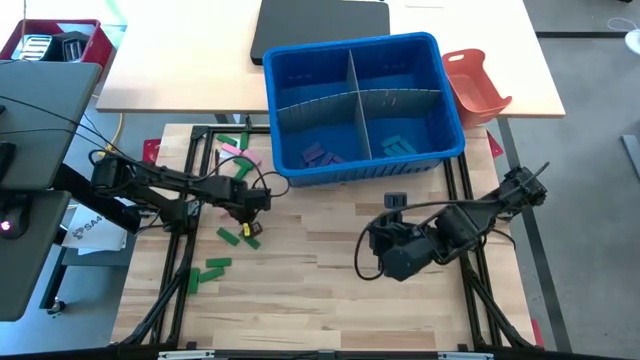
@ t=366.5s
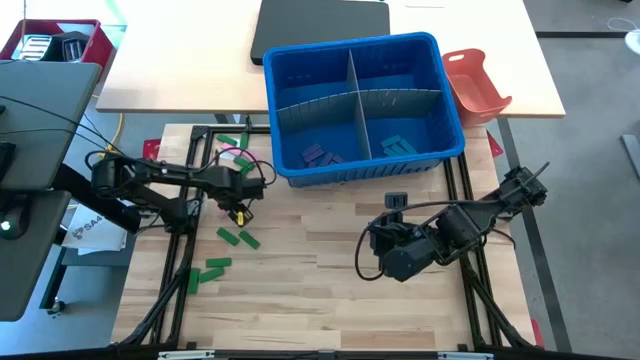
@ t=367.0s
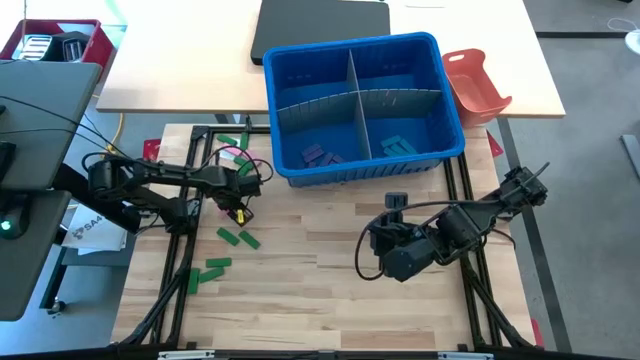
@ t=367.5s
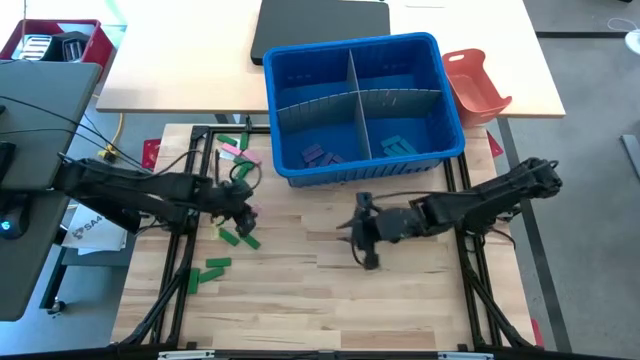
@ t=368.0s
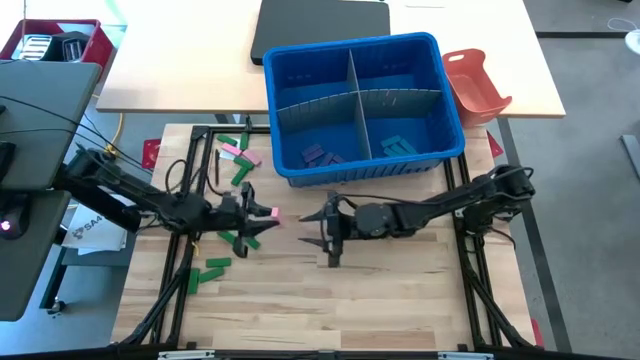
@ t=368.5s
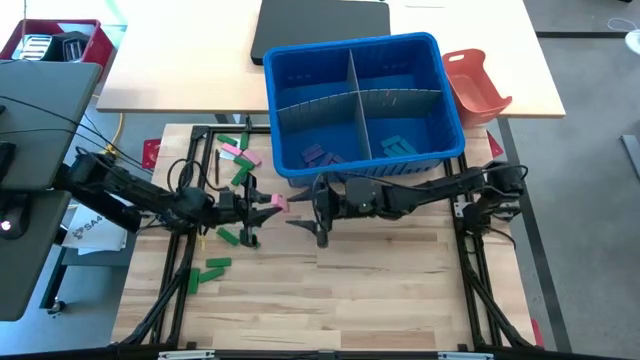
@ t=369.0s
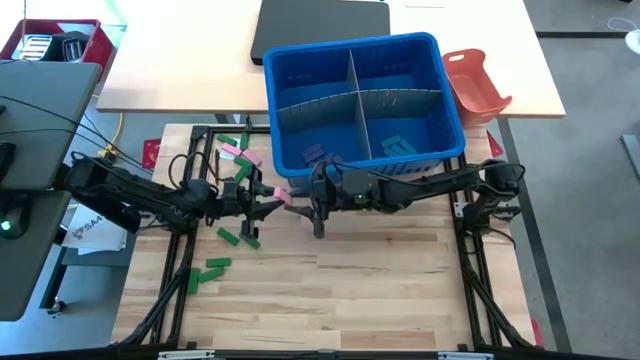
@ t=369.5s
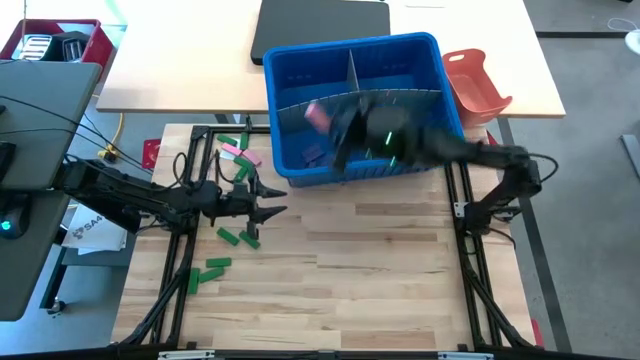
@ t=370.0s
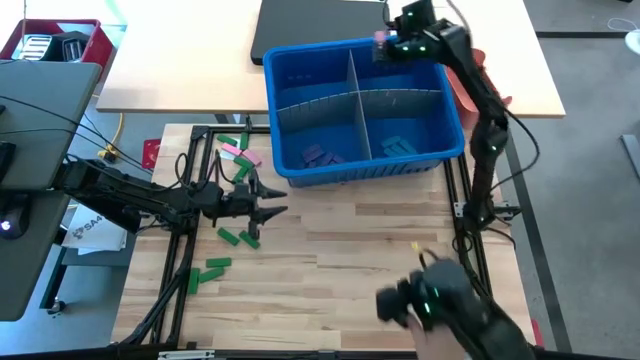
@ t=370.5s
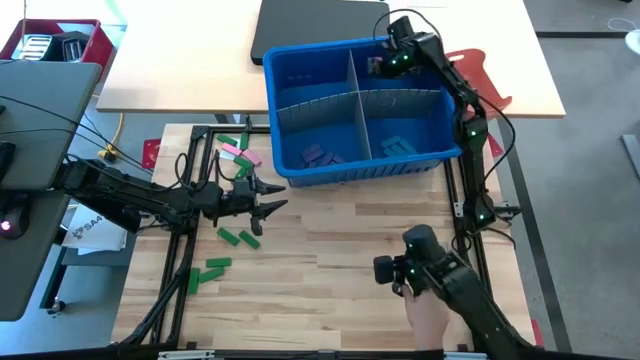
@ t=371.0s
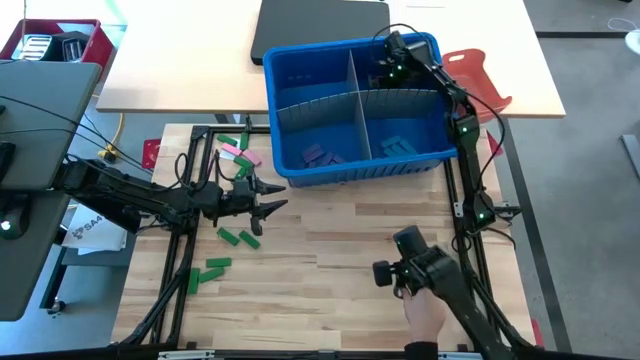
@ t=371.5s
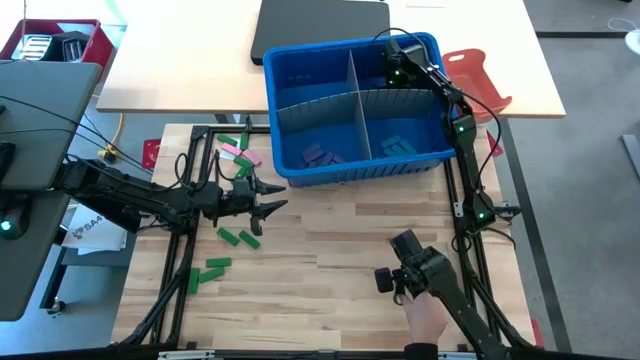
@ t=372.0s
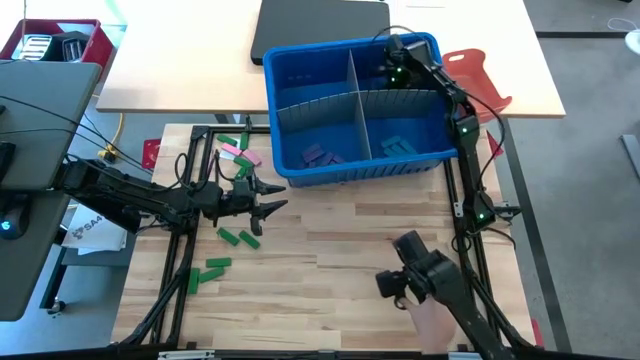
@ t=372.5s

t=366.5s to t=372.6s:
Task: Sort blocks
Put the pink block into the blue bin with the other pink block

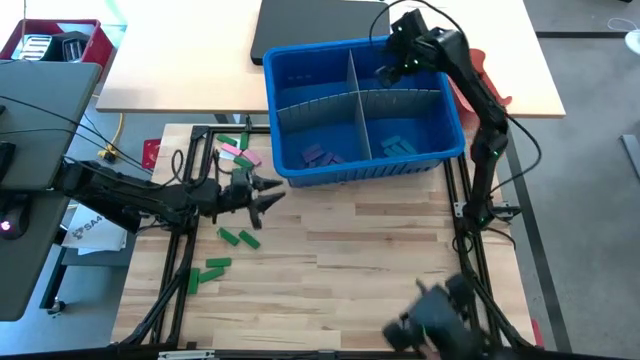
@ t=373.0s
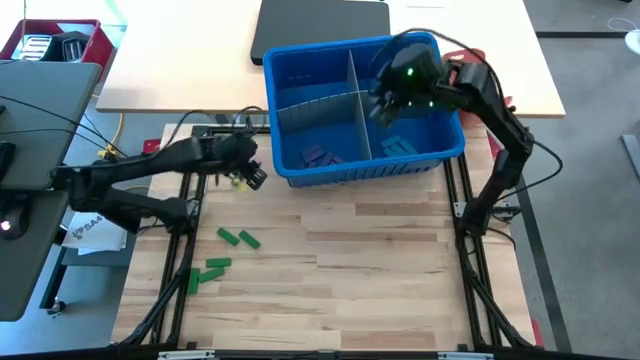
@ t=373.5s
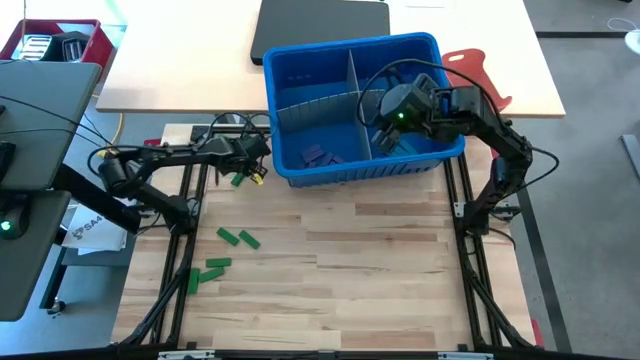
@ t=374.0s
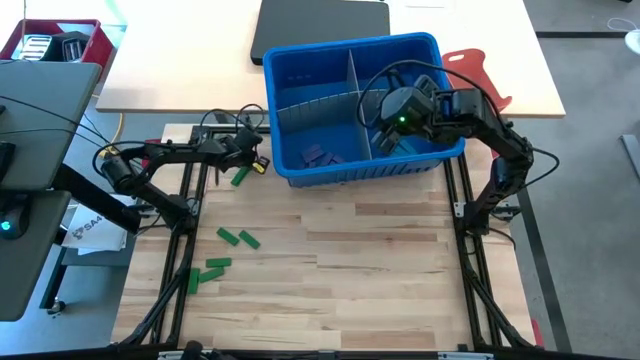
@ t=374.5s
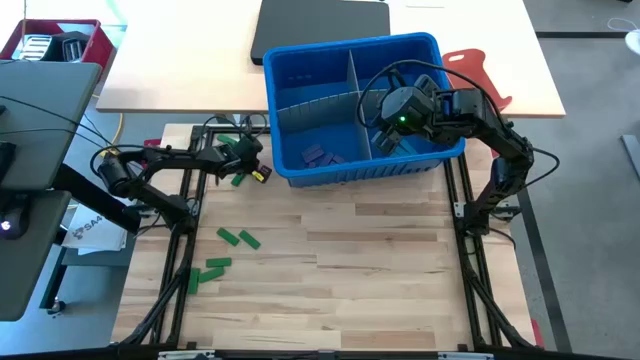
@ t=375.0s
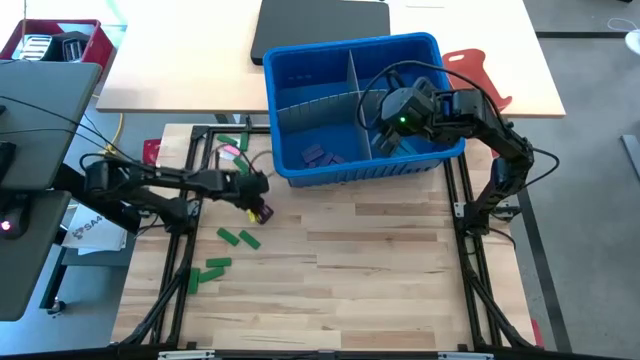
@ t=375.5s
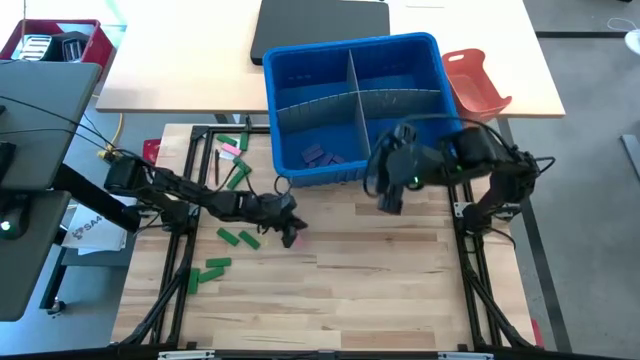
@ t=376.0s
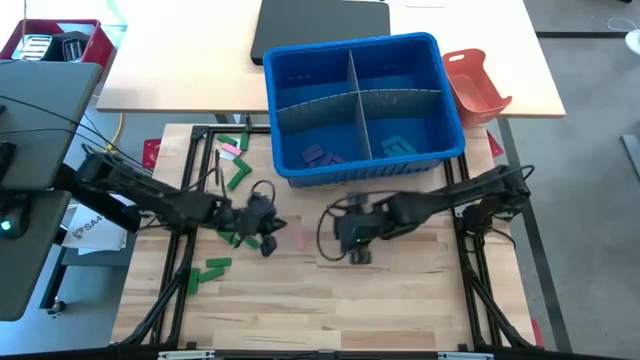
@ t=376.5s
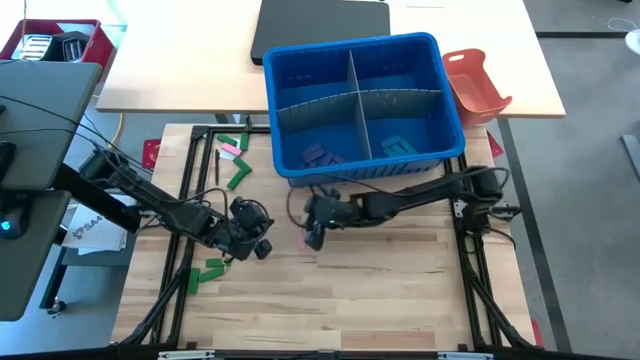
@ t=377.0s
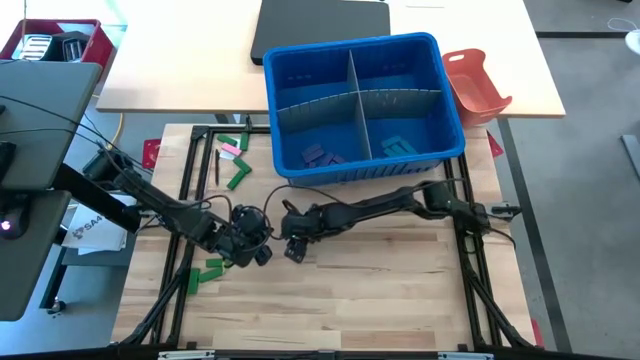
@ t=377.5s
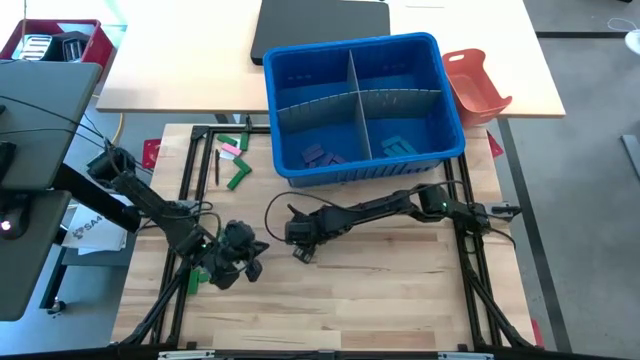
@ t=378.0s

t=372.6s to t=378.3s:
Put the pink block into the blue bin with the other pink block

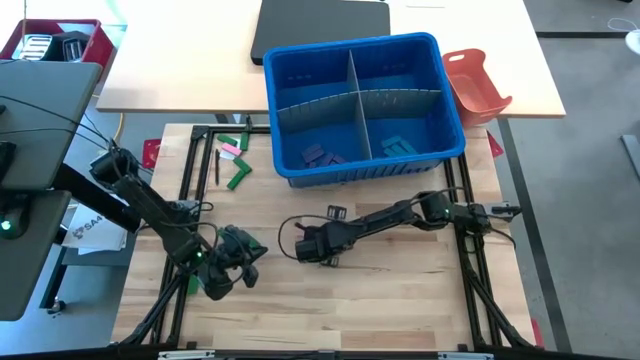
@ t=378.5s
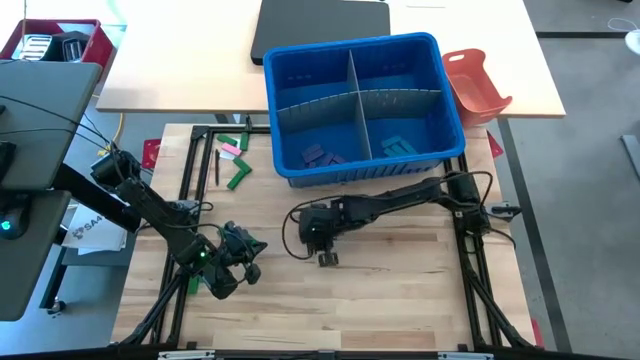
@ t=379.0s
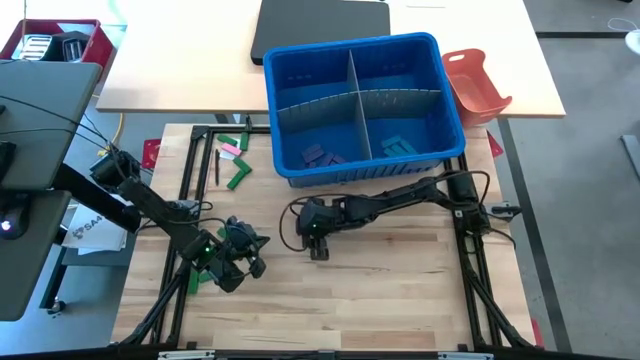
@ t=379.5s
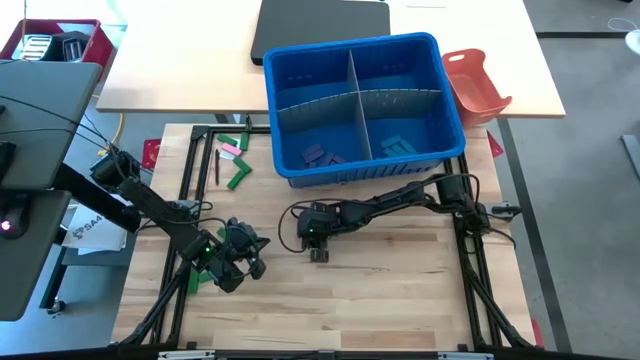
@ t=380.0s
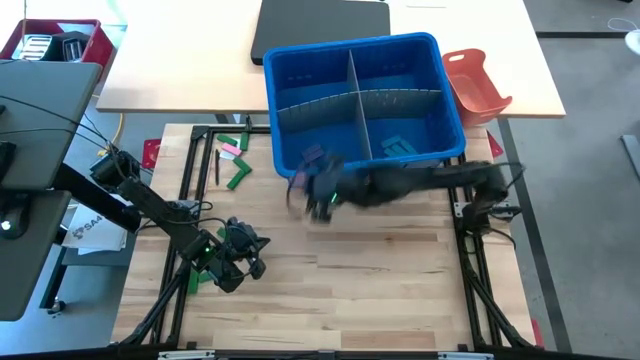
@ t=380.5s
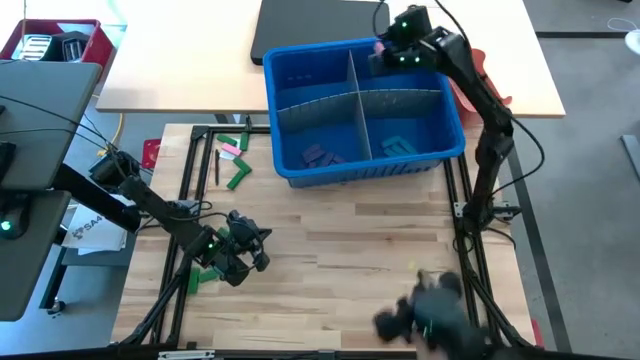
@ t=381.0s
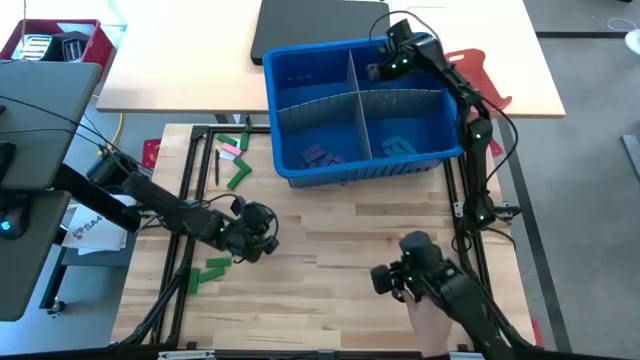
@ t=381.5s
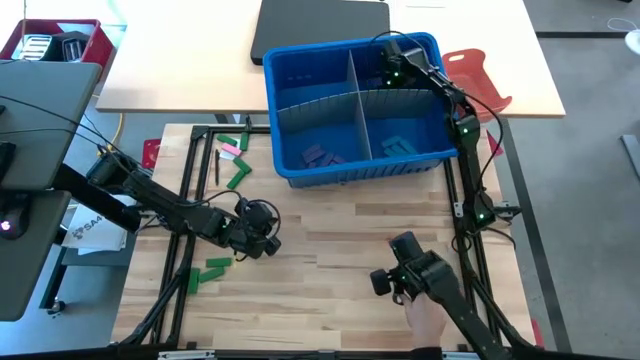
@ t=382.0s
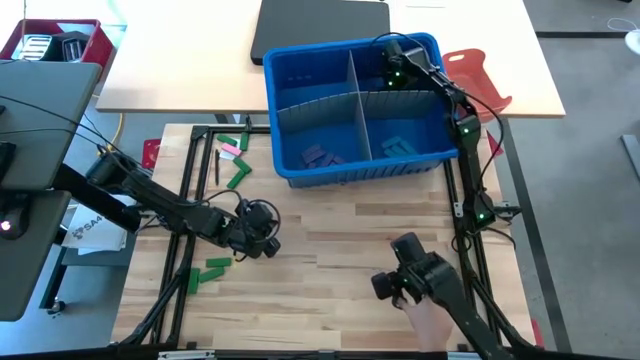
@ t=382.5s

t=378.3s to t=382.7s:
Put the pink block into the blue bin with the other pink block

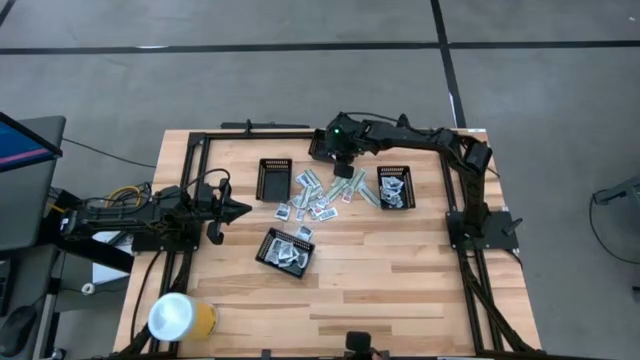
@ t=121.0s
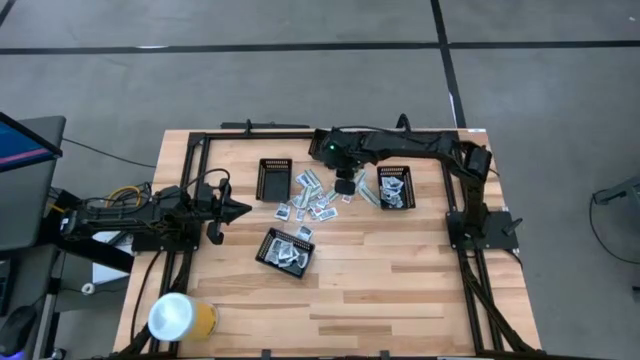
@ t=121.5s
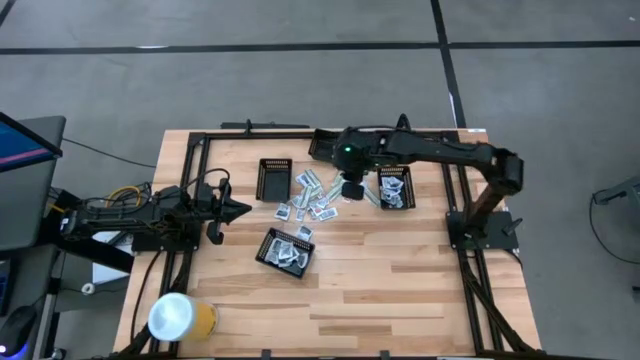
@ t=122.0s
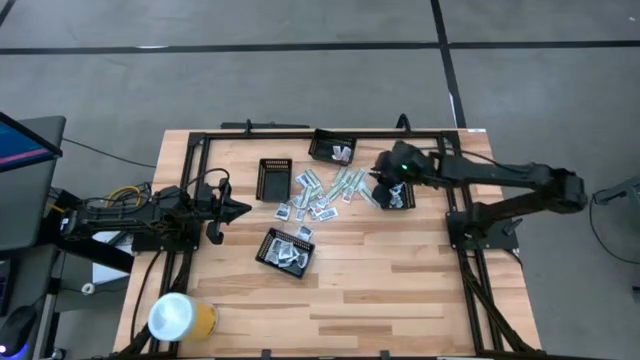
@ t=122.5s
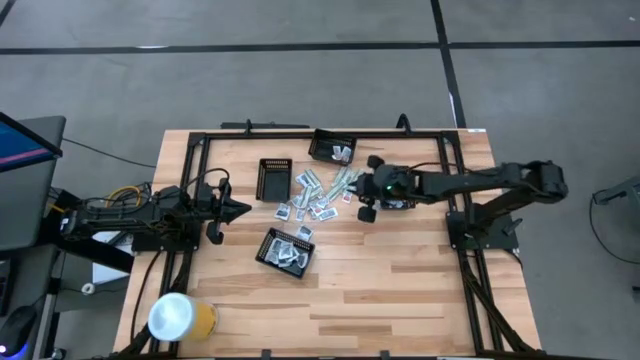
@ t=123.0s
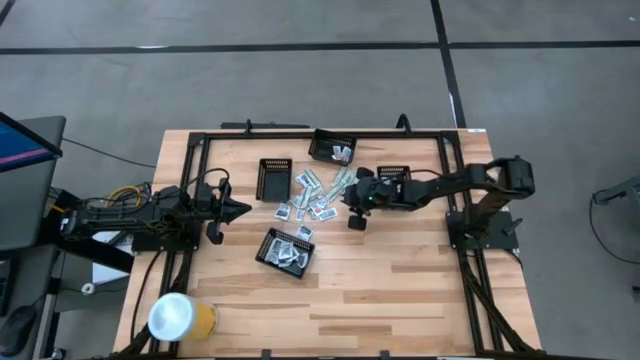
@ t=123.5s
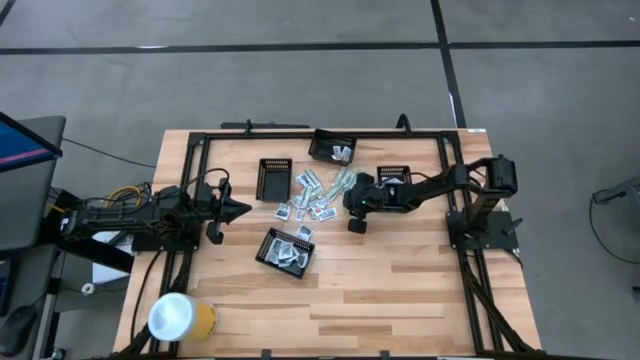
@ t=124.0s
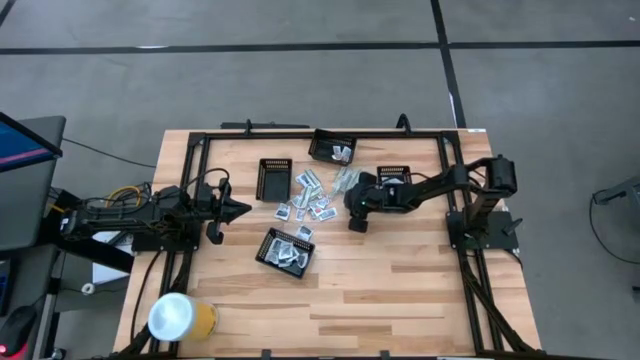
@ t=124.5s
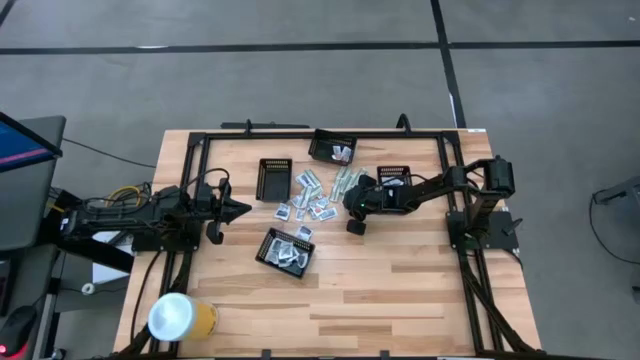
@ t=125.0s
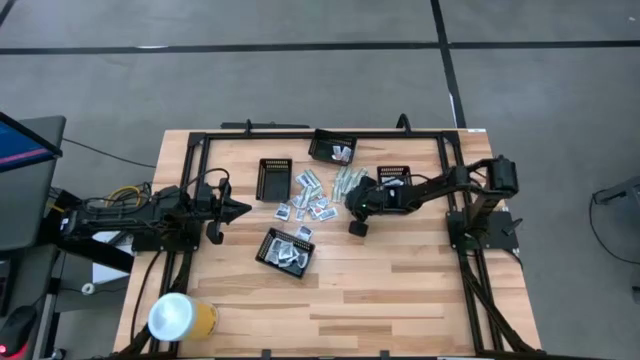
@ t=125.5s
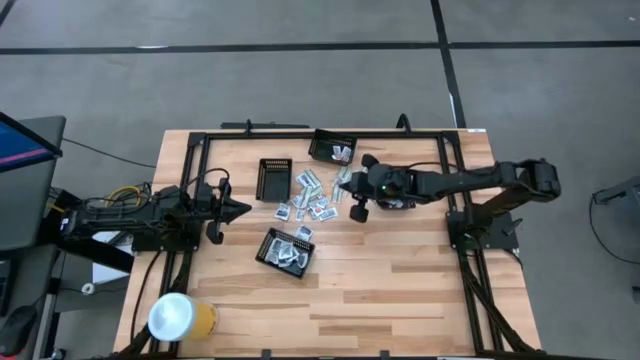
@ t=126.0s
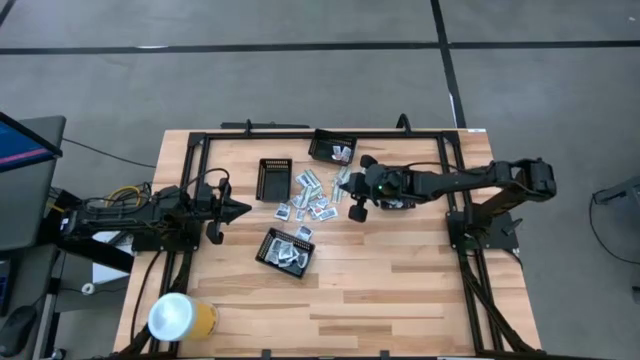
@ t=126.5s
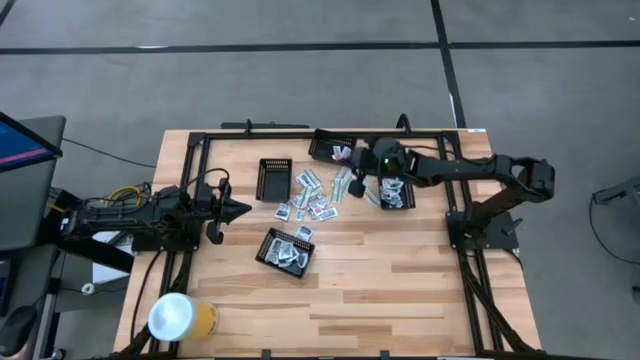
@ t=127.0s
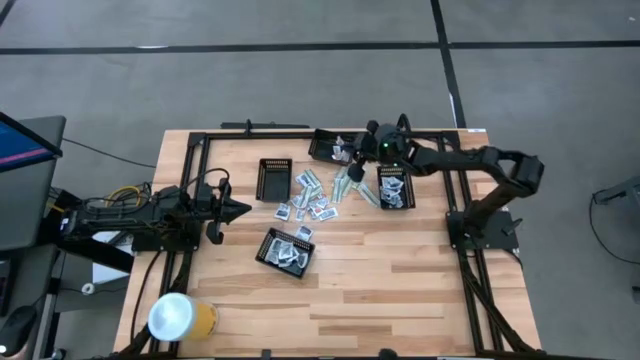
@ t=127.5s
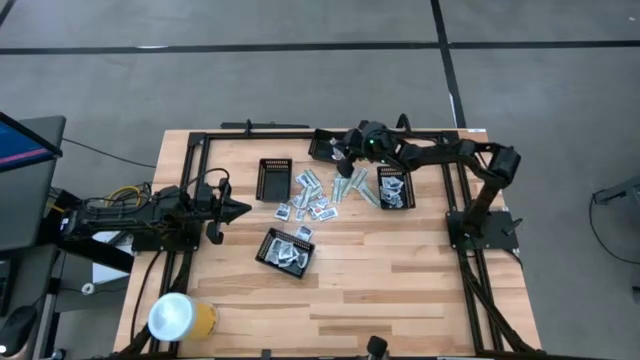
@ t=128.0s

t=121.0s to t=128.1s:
Task: Pick & Place First Aid Supplies
Put the orange ointment pack into the top black bin
